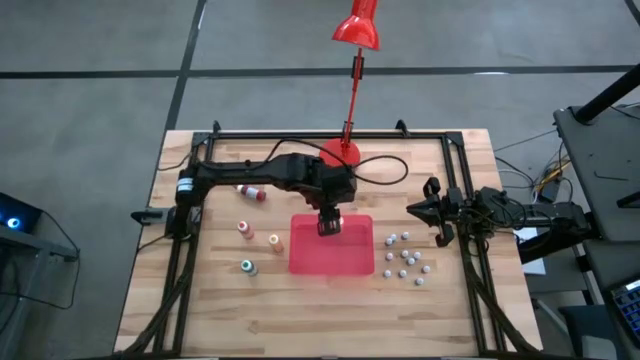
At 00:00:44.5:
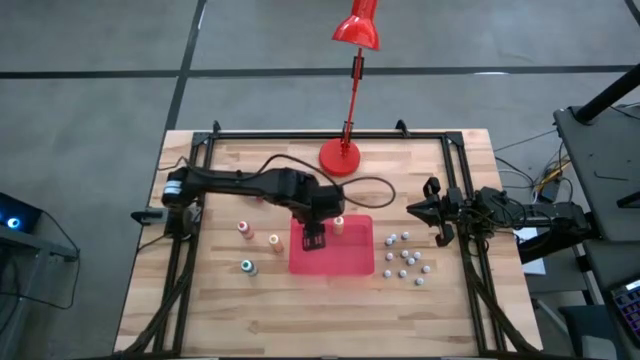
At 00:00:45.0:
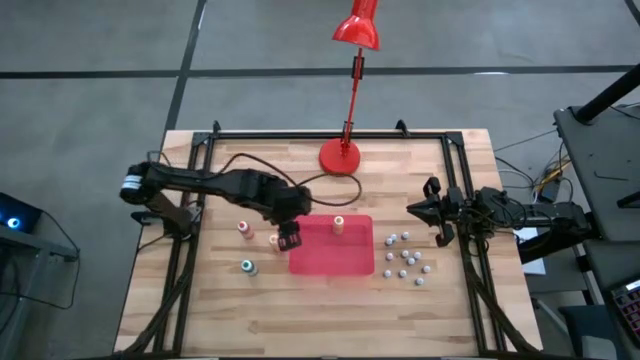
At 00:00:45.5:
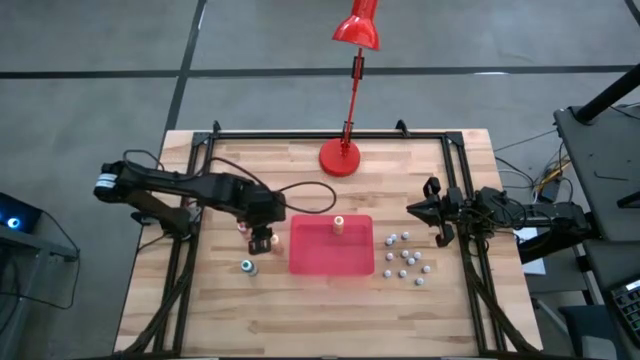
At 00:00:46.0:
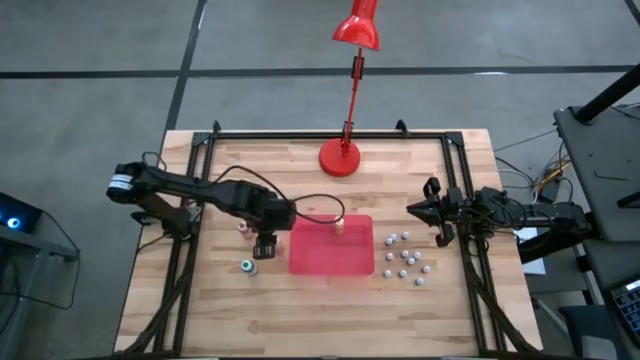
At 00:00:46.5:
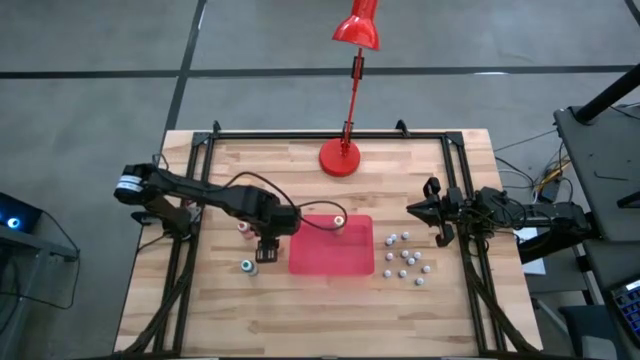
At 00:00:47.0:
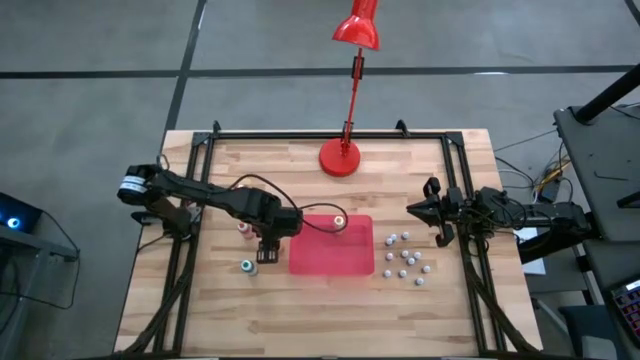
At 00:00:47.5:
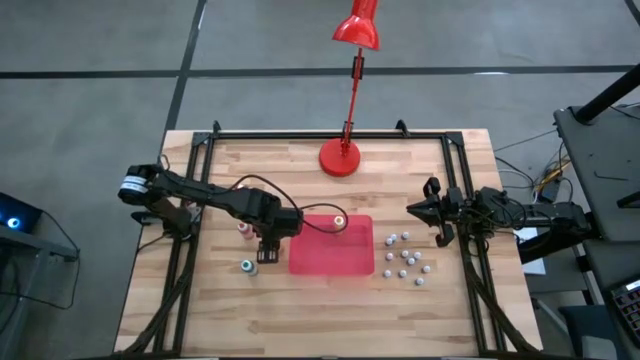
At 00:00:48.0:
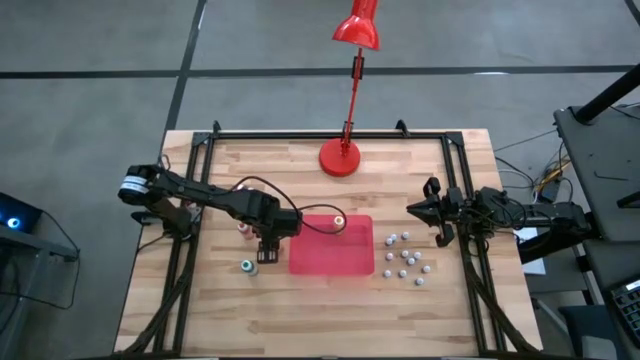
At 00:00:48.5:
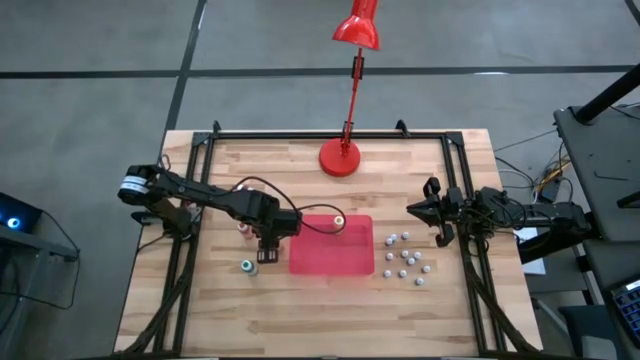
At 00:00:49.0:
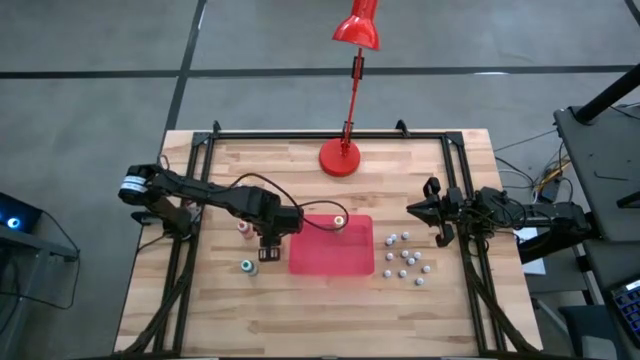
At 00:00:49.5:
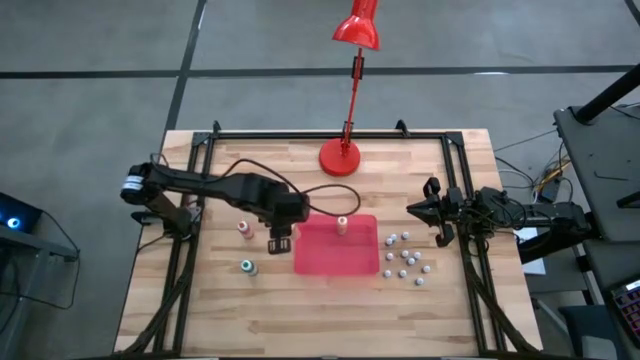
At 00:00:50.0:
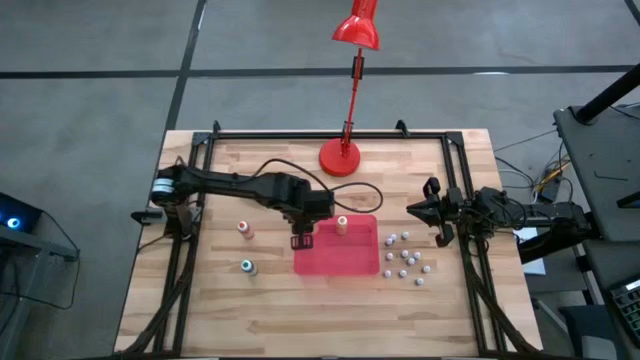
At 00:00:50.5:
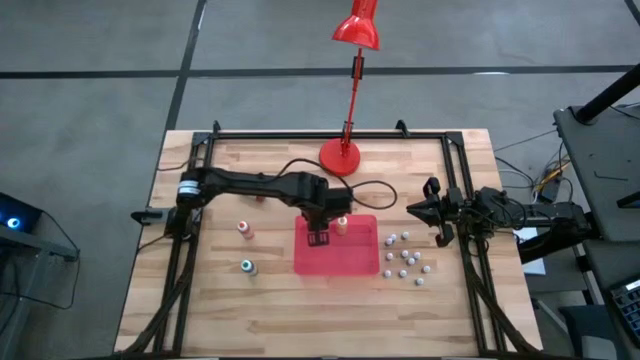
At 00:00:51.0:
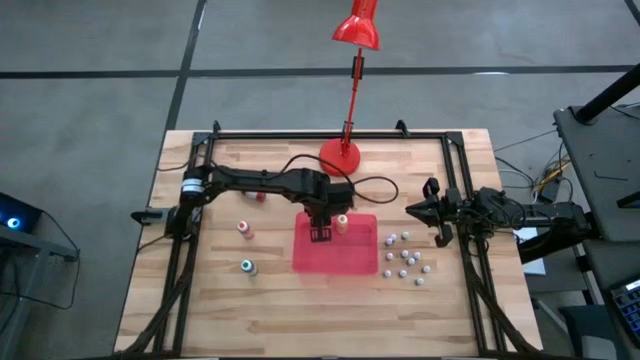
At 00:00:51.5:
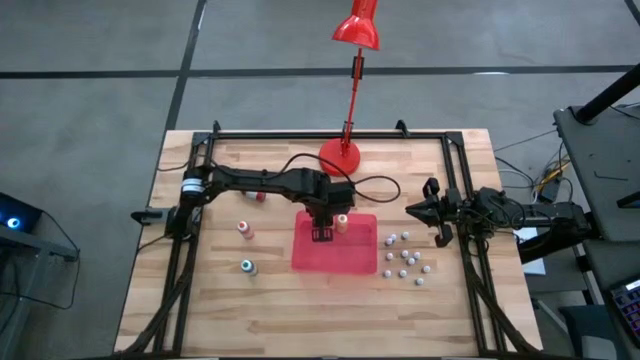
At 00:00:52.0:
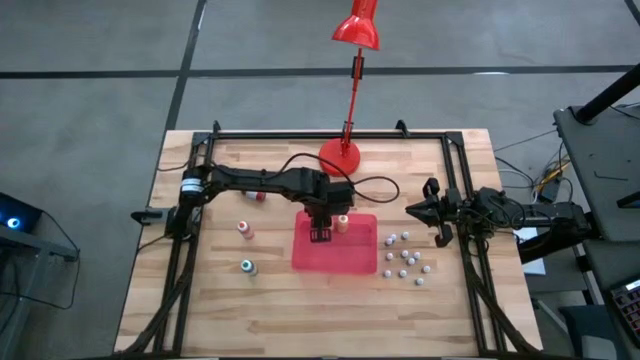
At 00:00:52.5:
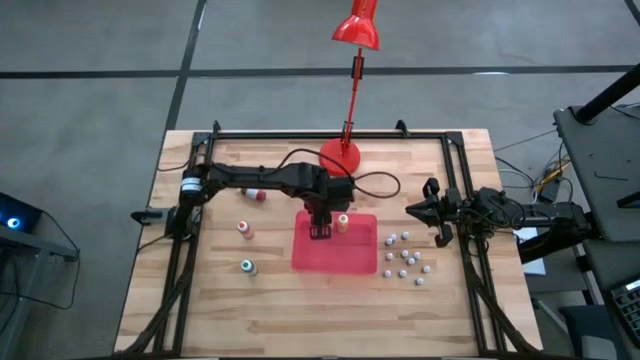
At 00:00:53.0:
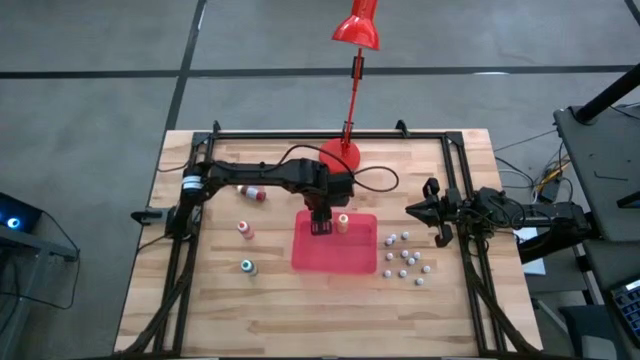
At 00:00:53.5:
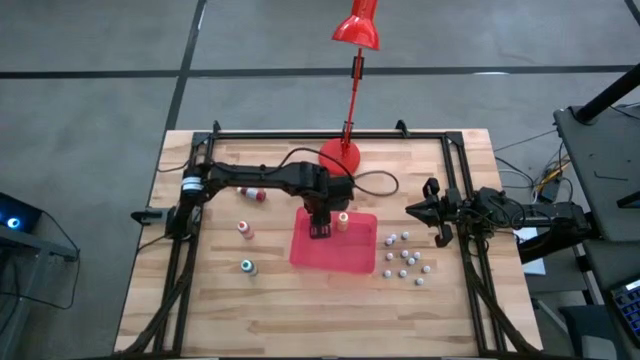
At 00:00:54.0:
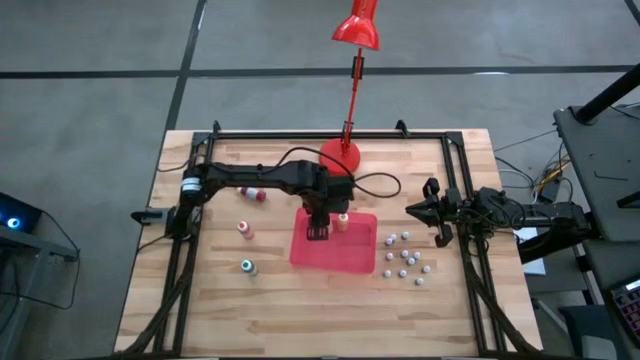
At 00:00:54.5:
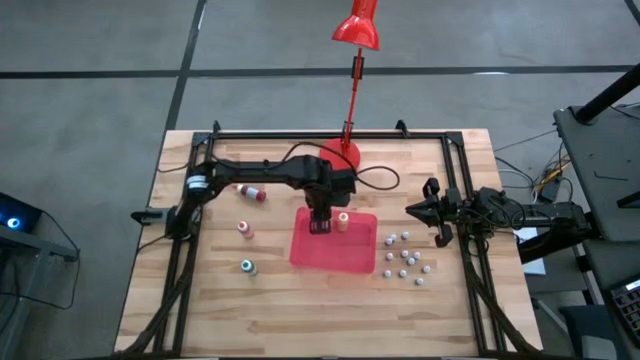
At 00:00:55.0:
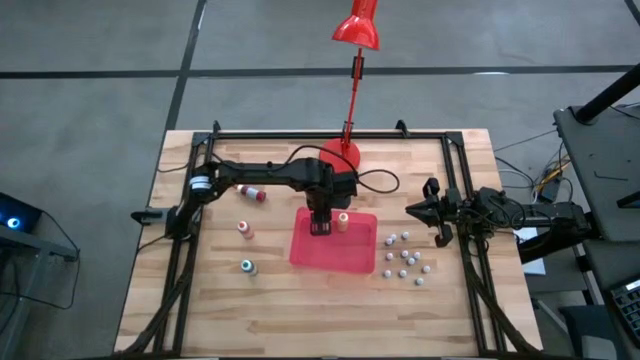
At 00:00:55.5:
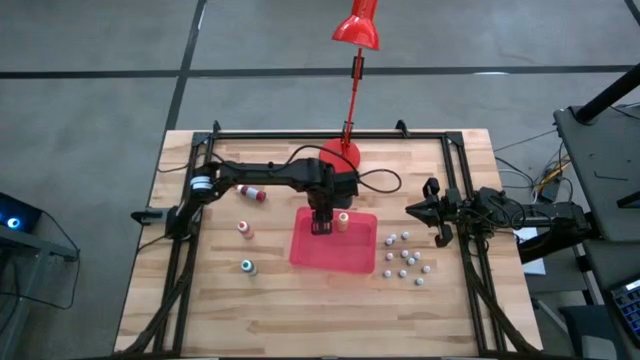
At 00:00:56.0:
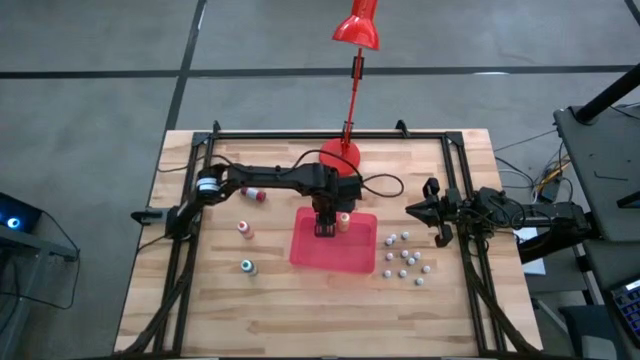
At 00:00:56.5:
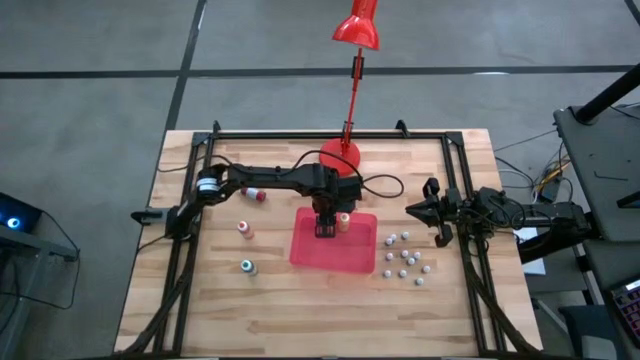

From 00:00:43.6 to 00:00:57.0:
Task: Pick & Place food coloring
Put the large yellow food coloring bottle into the red bin

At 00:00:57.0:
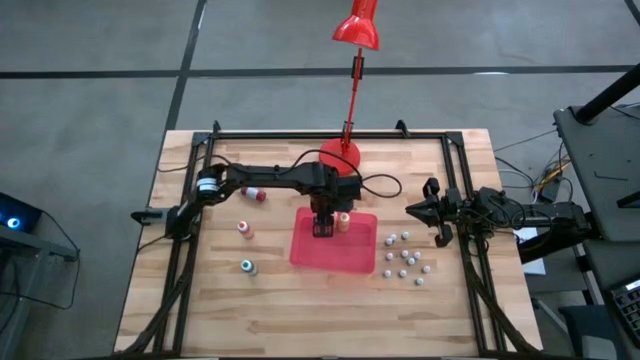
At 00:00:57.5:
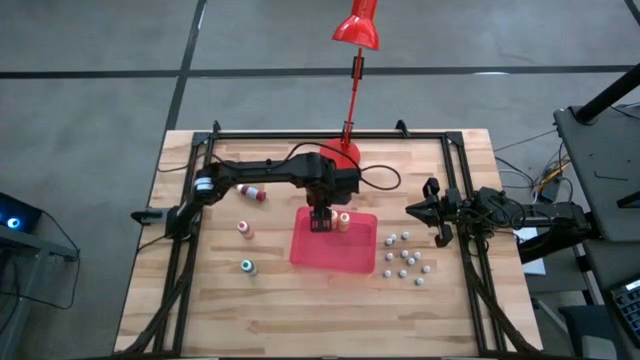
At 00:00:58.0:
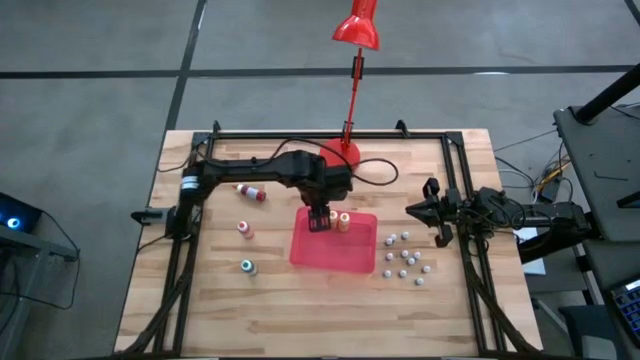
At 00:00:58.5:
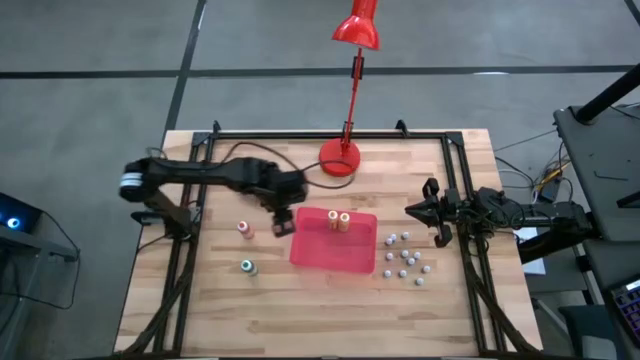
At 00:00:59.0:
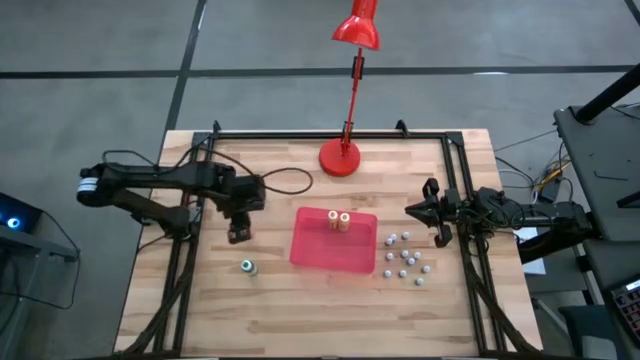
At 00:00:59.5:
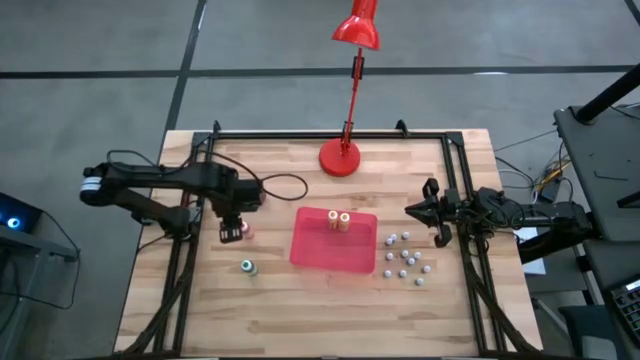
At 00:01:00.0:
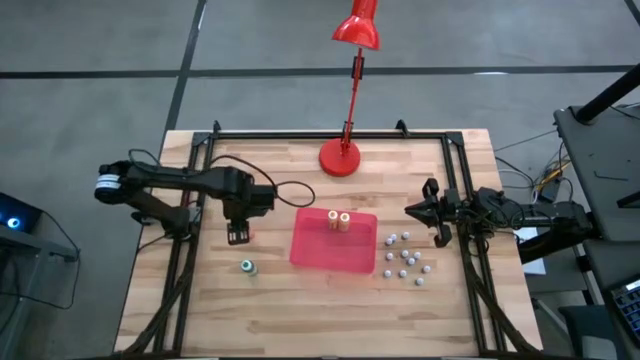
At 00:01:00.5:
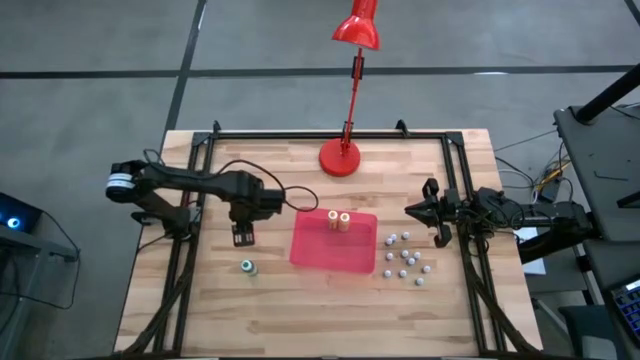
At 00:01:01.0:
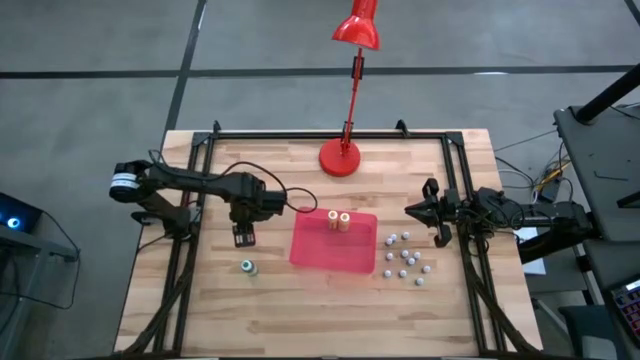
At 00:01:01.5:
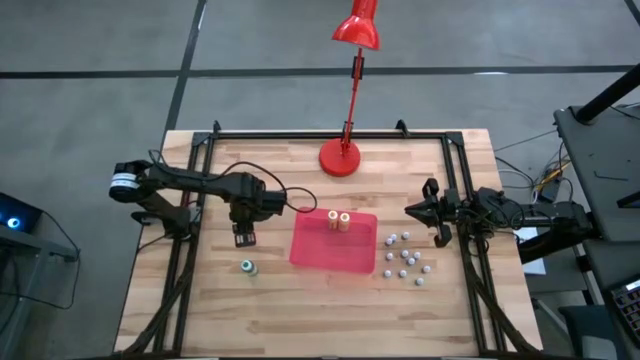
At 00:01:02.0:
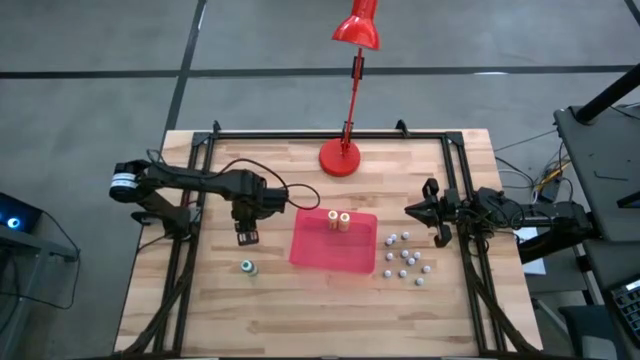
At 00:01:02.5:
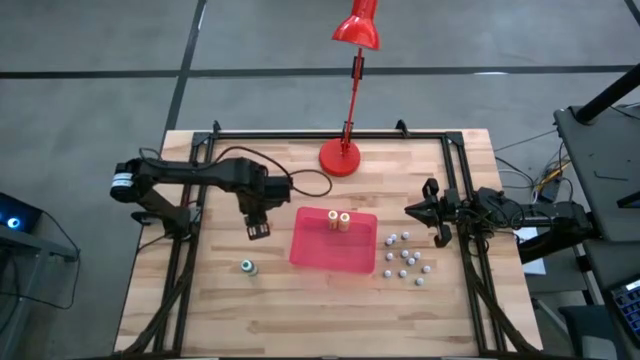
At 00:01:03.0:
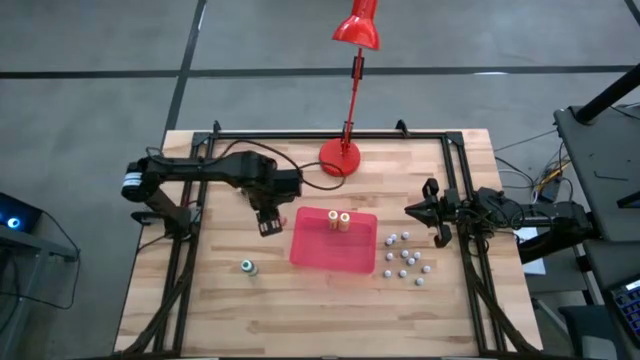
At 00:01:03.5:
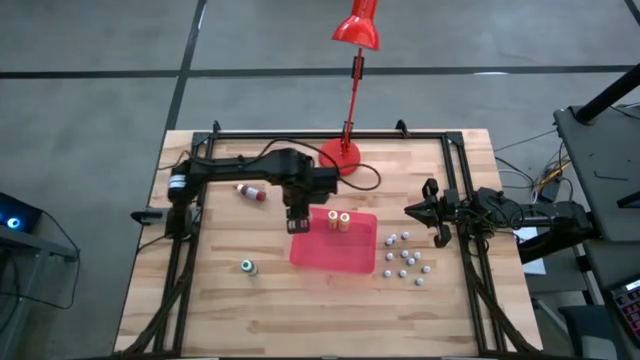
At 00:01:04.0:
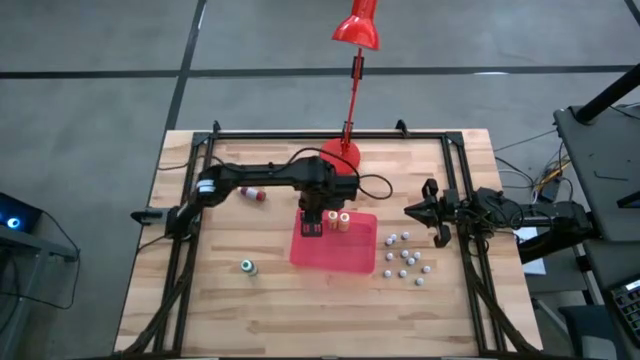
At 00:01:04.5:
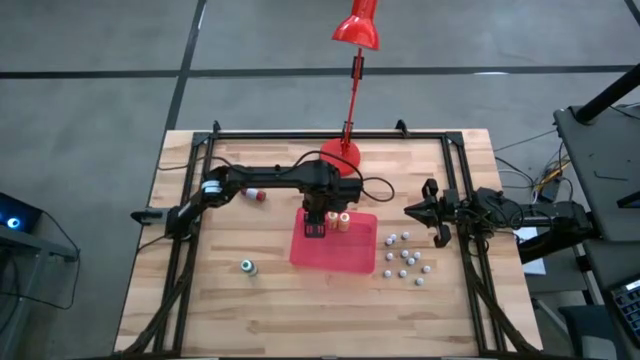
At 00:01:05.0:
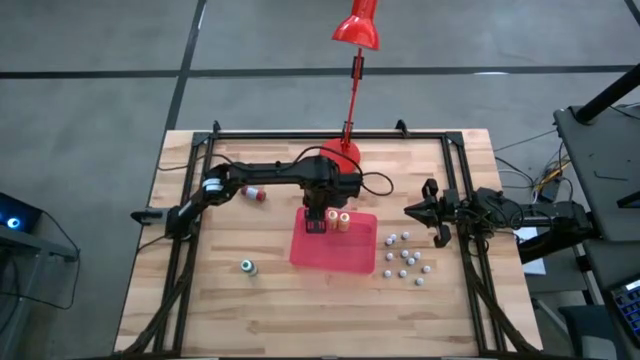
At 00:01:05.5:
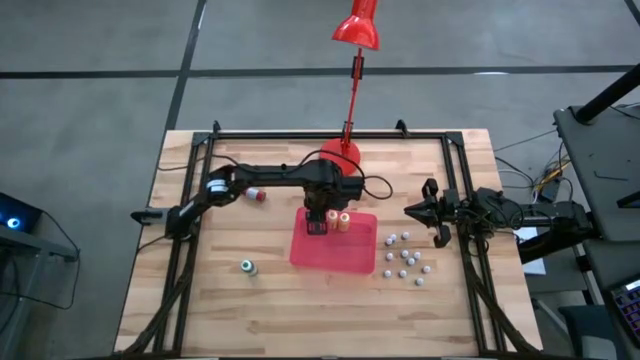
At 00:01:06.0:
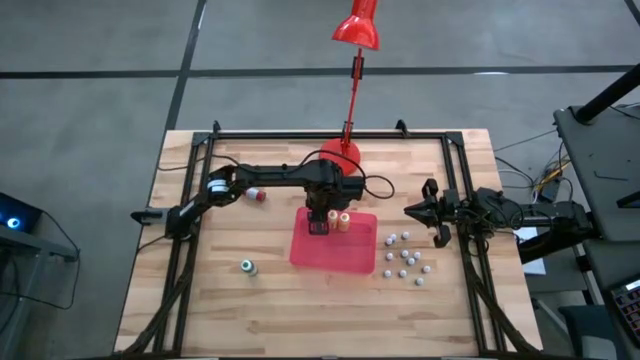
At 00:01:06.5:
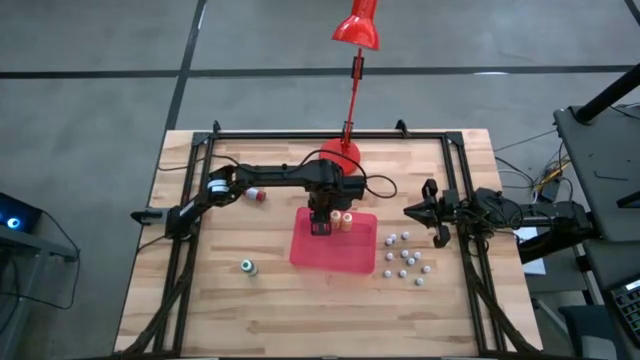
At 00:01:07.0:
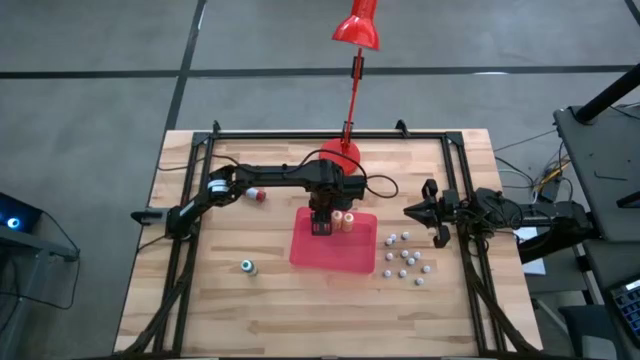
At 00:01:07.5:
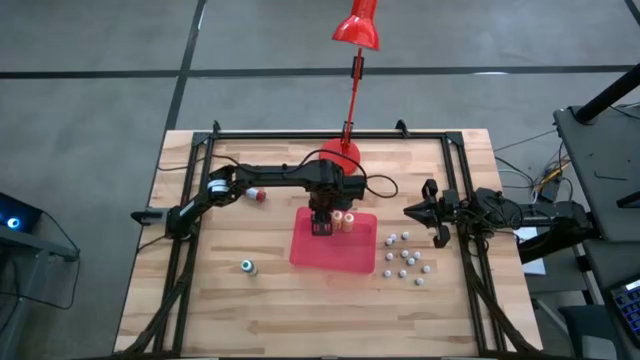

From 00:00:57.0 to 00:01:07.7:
Put the large orange food coloring bottle into the red bin
